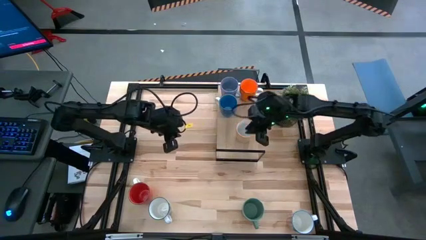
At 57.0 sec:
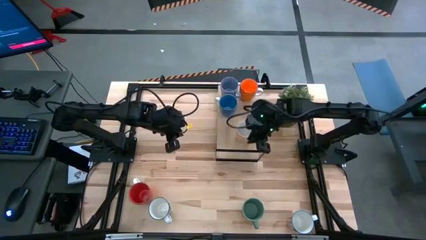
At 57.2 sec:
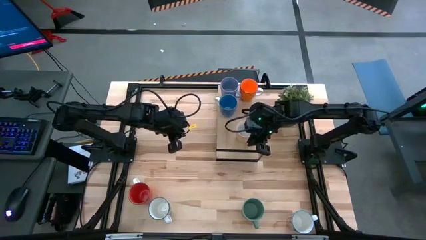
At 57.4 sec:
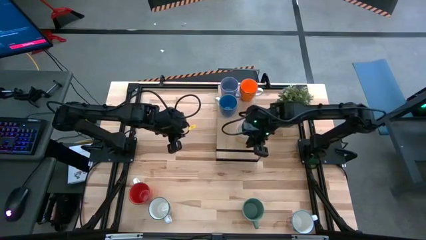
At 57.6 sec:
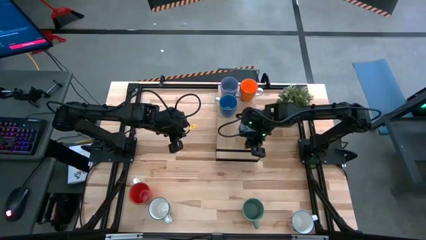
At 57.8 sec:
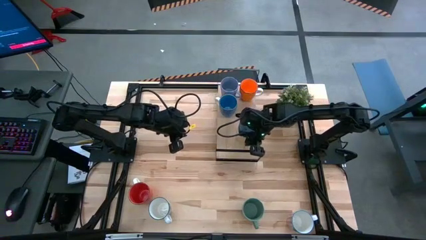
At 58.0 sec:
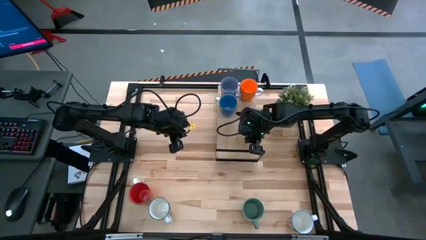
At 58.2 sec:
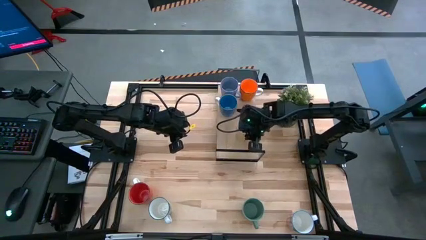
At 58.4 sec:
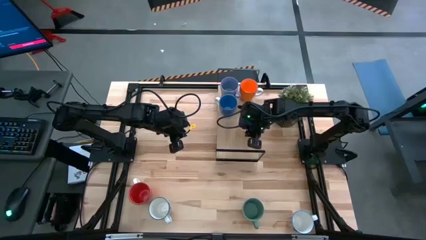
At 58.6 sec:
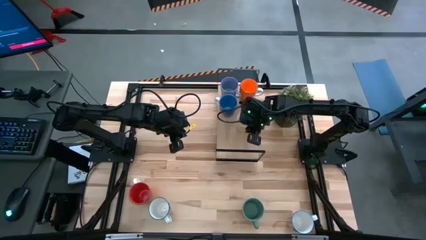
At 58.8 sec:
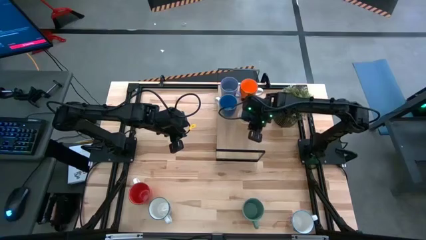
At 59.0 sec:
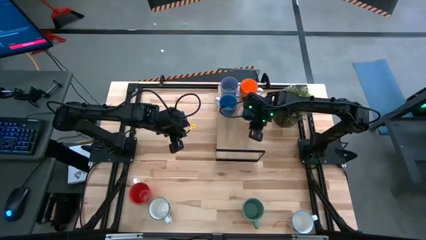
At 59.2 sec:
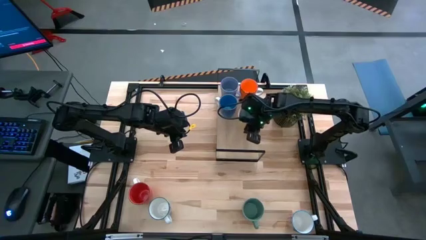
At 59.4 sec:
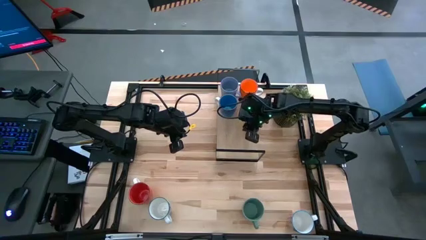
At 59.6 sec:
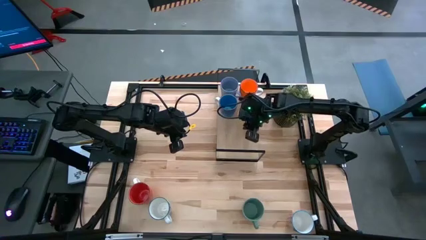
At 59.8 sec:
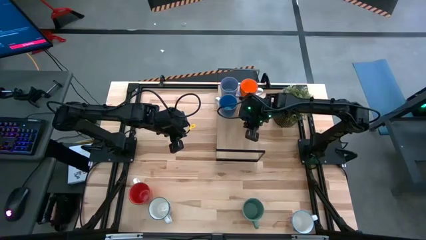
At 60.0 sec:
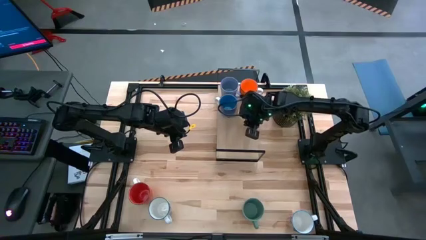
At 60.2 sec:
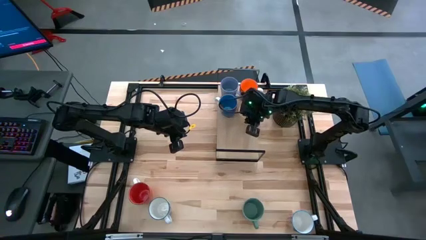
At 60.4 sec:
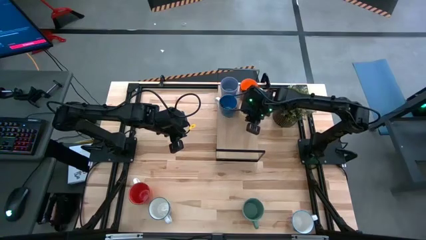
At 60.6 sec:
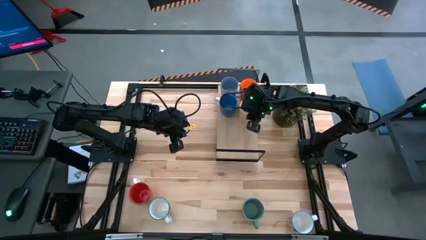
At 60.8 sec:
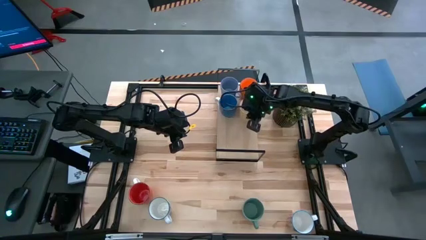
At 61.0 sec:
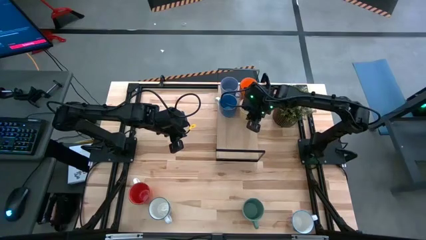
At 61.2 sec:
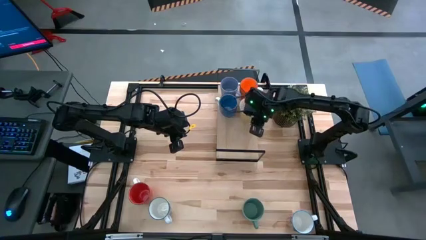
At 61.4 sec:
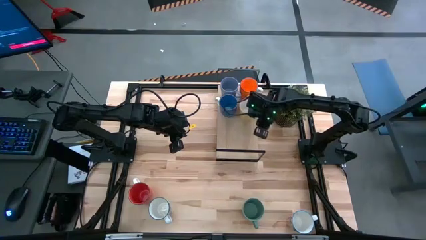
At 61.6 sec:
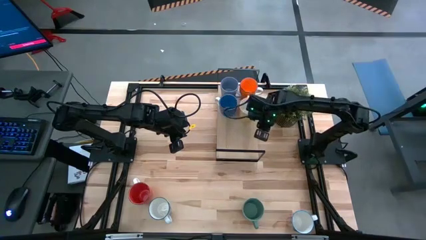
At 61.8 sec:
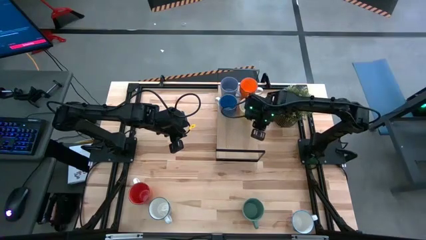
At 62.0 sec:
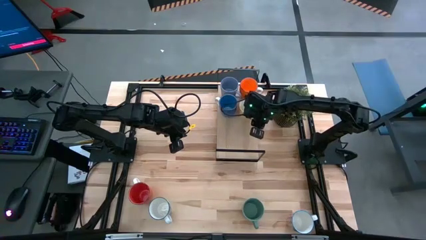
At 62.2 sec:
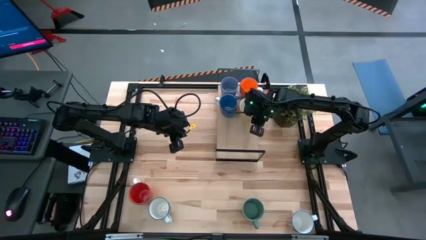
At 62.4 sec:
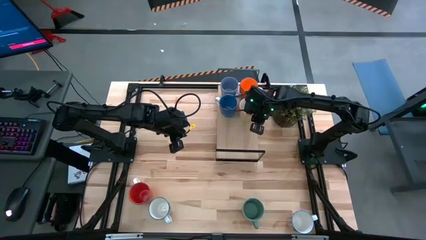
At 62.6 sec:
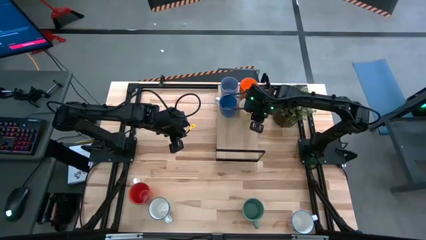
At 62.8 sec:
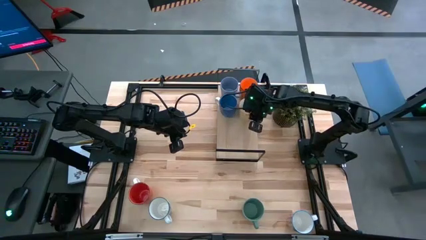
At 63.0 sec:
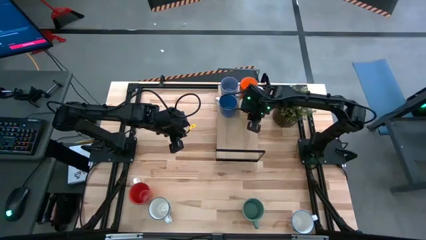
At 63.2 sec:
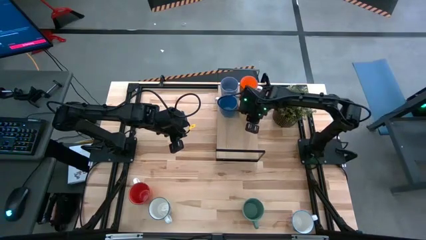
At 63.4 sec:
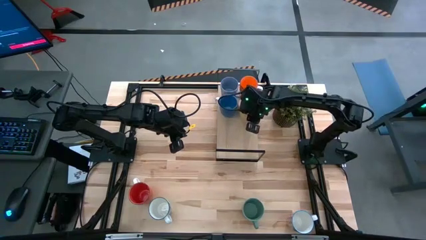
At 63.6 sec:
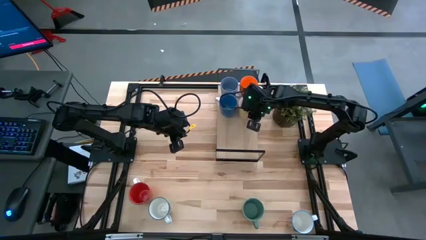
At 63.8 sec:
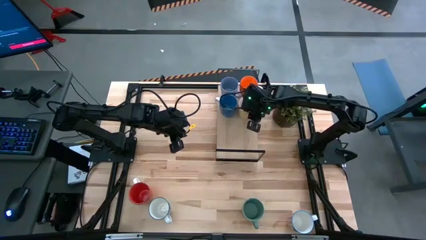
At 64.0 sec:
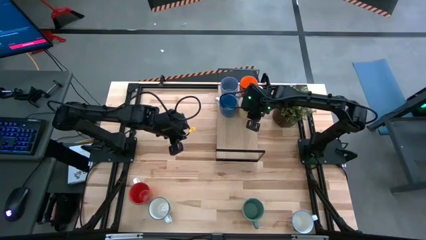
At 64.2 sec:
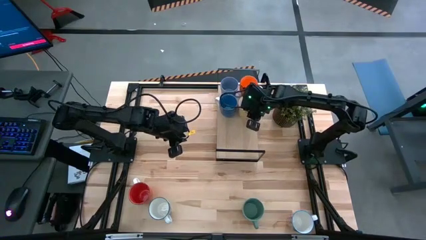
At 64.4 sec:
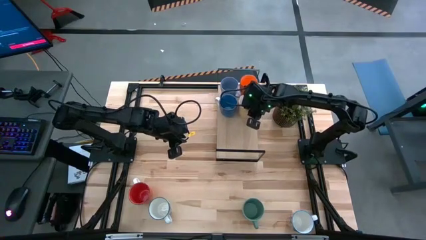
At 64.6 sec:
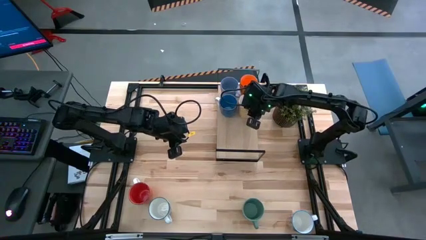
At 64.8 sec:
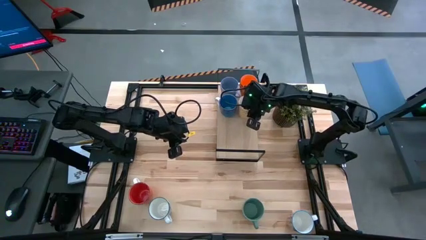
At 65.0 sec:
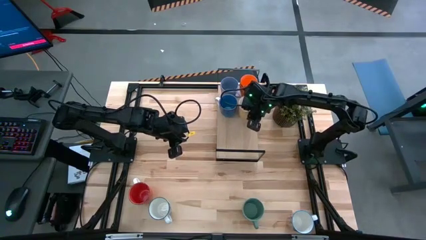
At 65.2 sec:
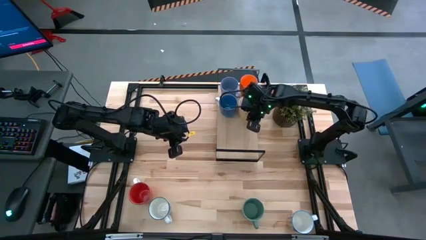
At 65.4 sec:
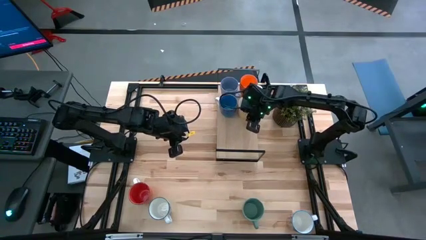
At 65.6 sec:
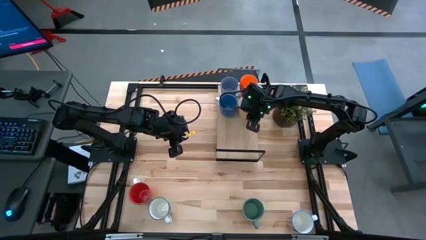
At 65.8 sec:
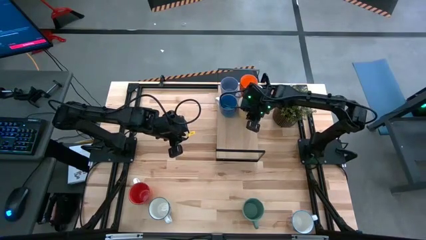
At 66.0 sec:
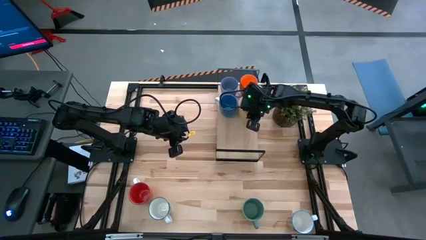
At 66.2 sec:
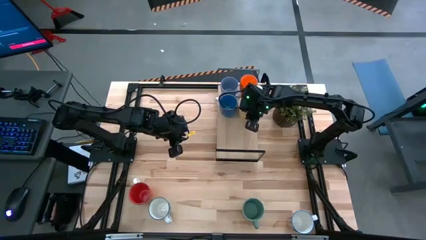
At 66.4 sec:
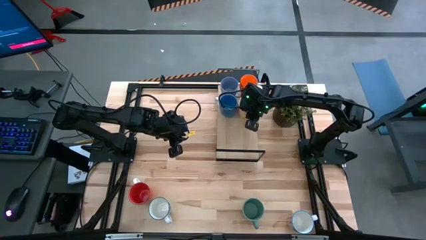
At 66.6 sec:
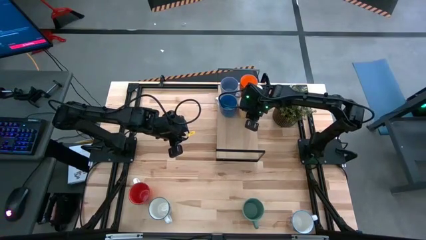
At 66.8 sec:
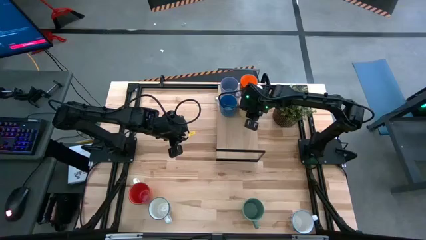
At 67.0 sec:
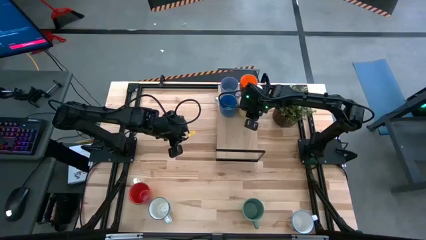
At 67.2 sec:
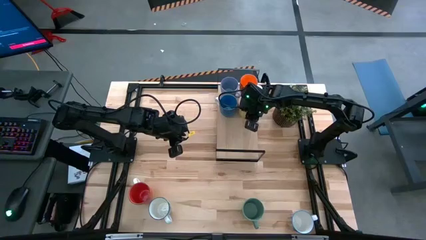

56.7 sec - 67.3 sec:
Task: Place coffee mugs
Put the yellow mug on the shelf, next to the orange mug

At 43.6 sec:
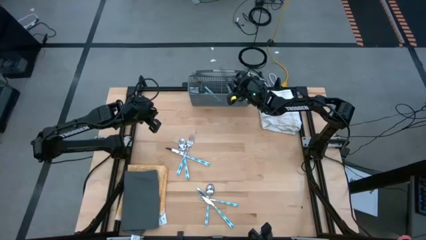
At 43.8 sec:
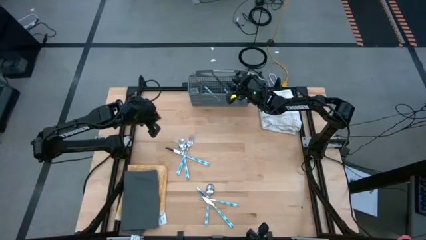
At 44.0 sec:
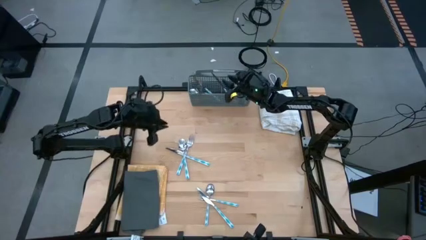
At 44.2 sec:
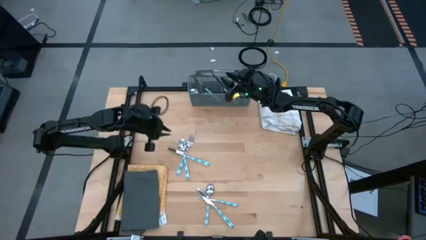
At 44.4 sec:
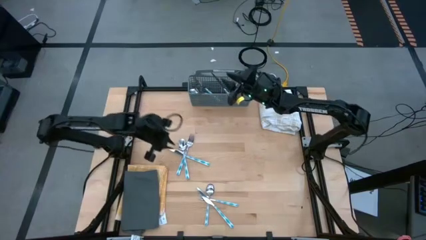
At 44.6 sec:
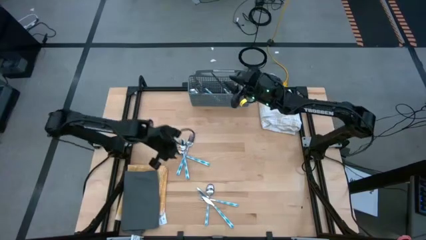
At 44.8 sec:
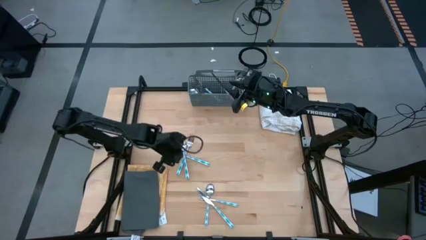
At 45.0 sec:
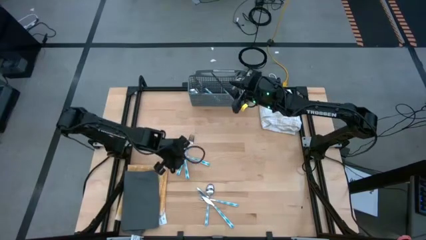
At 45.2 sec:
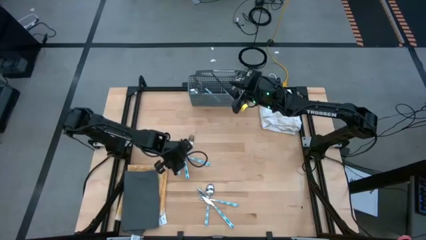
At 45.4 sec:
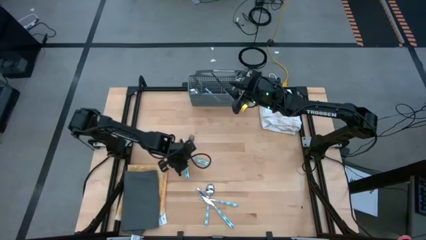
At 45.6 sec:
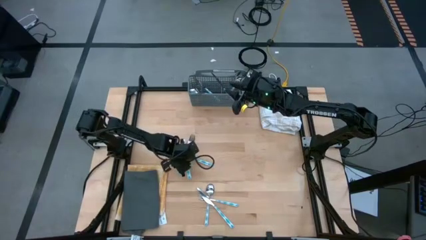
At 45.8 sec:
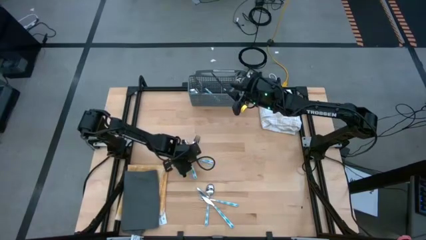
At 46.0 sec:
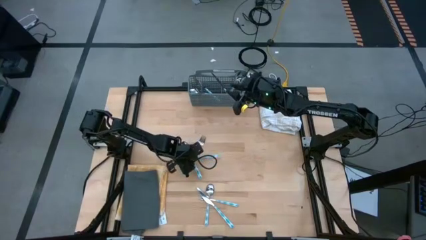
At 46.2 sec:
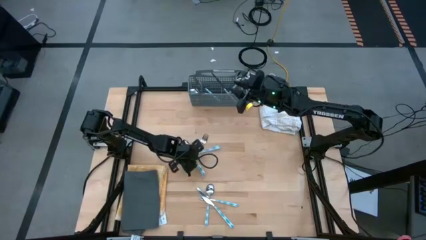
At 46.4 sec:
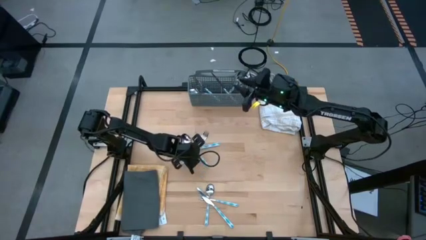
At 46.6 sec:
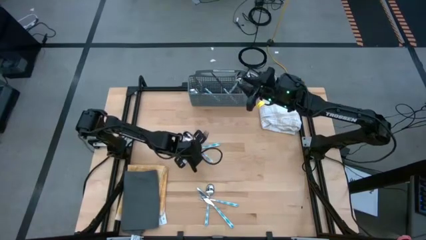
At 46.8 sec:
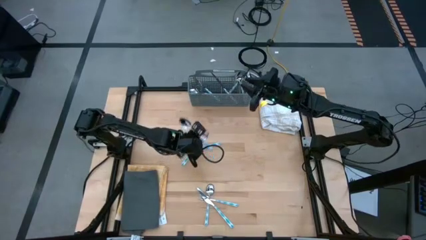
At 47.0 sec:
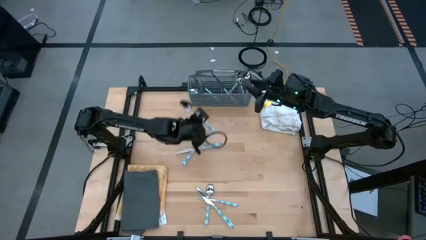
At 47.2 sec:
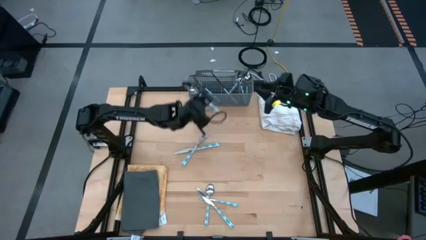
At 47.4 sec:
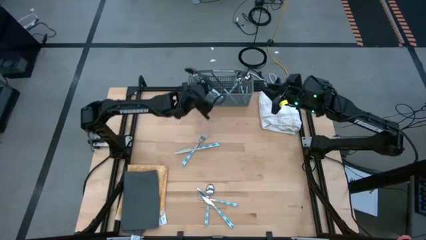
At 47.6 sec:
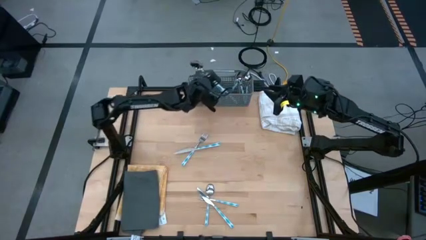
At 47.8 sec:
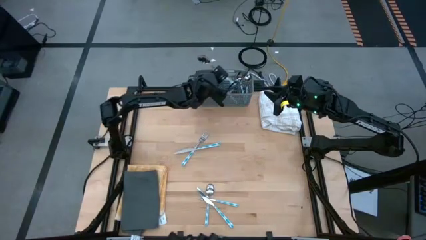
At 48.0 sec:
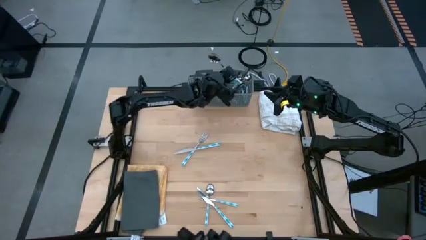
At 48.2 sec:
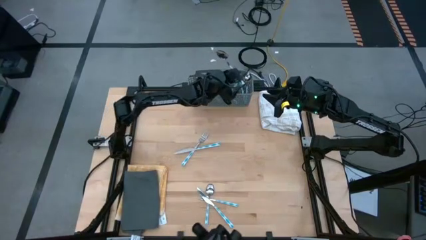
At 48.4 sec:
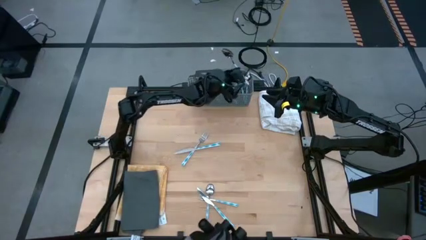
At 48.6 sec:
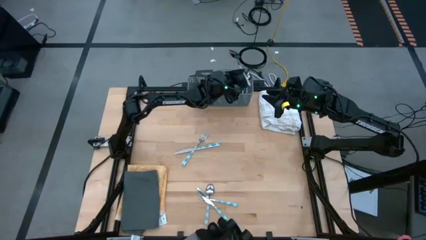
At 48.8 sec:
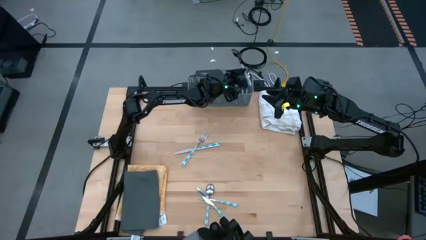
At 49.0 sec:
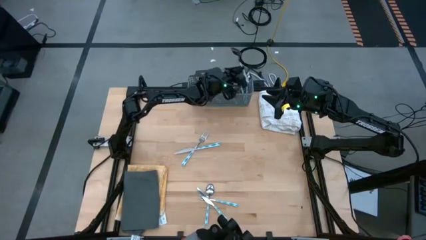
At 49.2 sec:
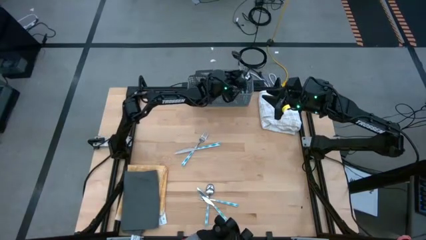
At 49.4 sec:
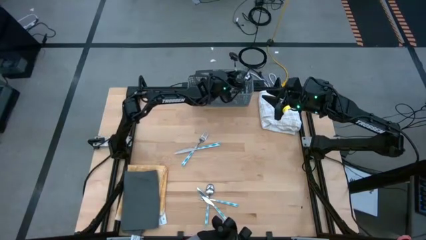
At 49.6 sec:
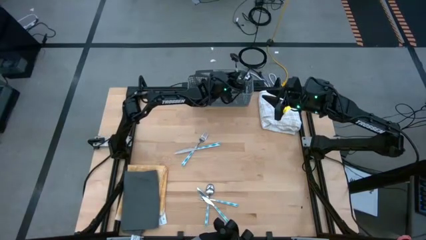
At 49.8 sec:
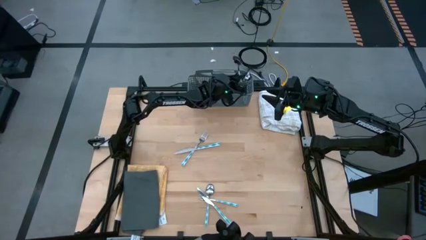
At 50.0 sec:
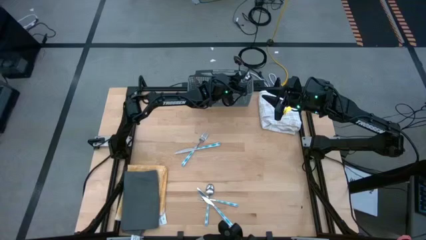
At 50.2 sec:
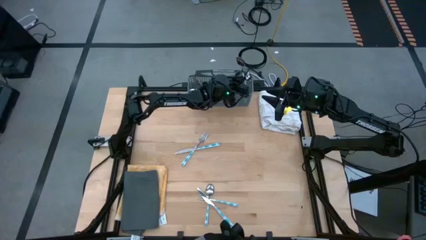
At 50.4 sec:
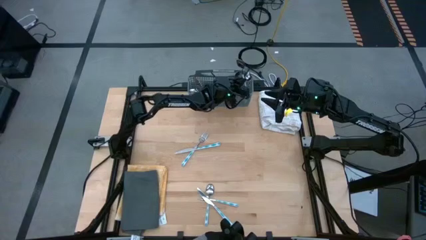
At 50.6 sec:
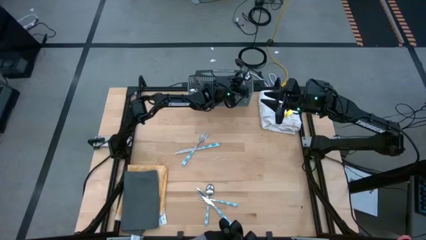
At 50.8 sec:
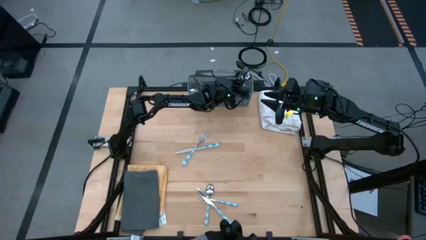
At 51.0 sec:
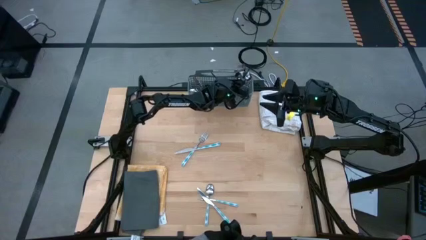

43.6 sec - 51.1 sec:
Task: Sort silverware
Put the top blue spoon into the gray silverware rack
